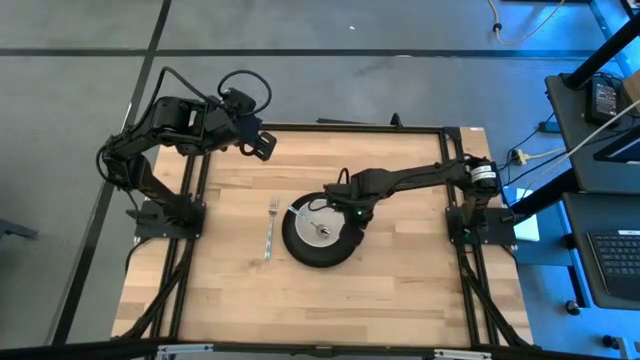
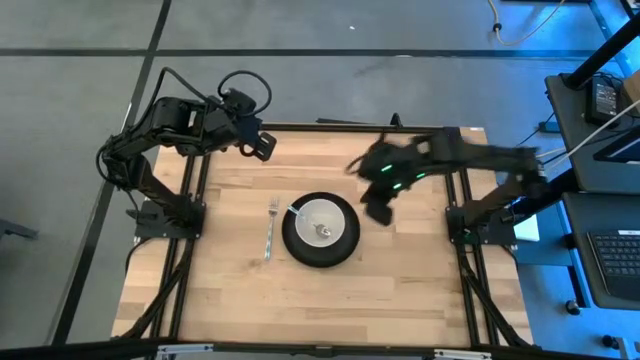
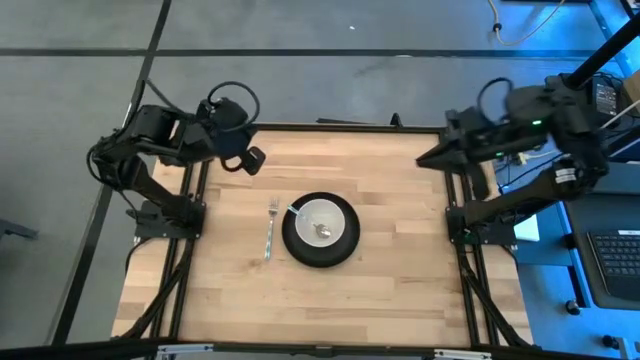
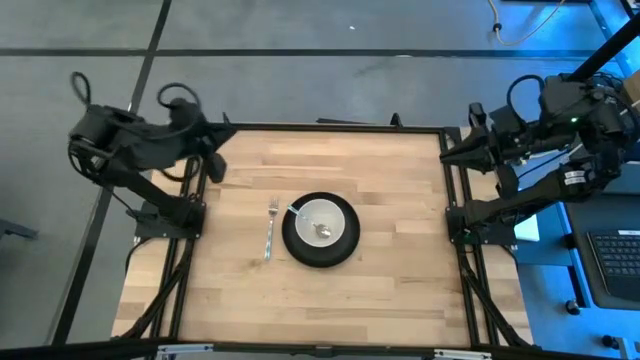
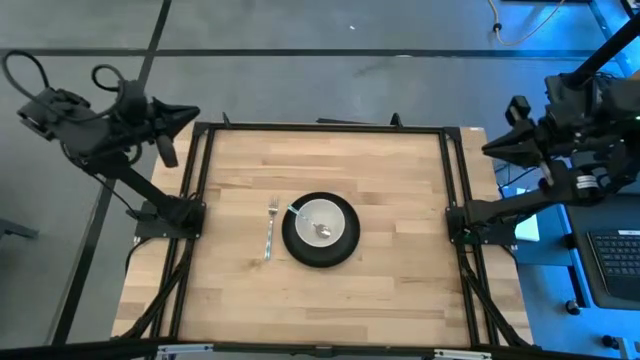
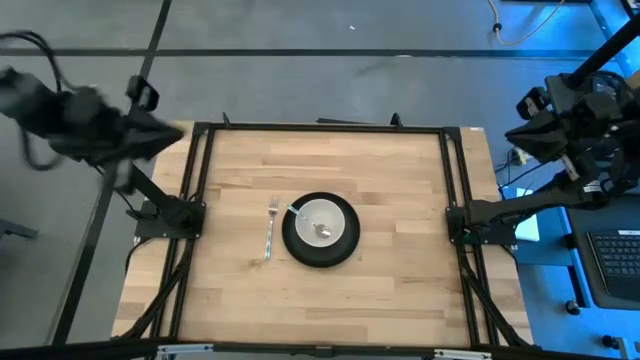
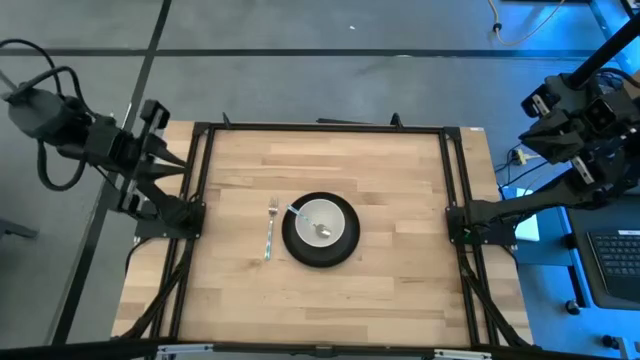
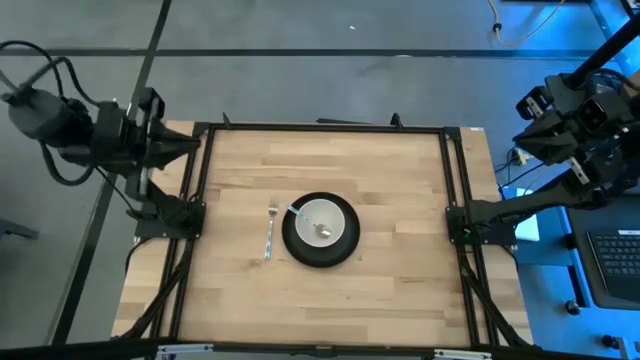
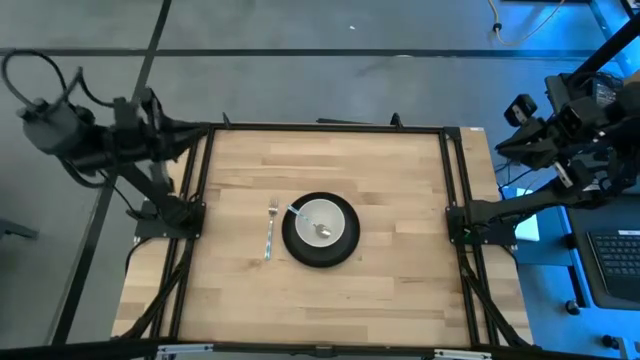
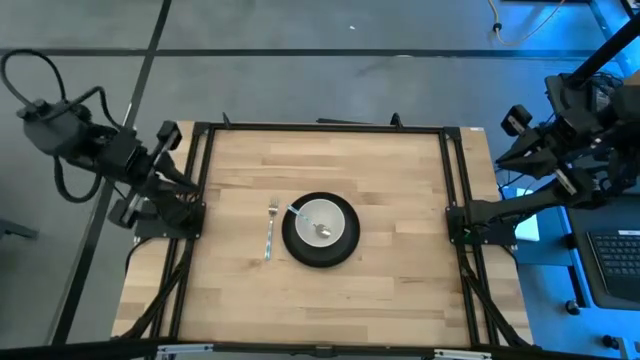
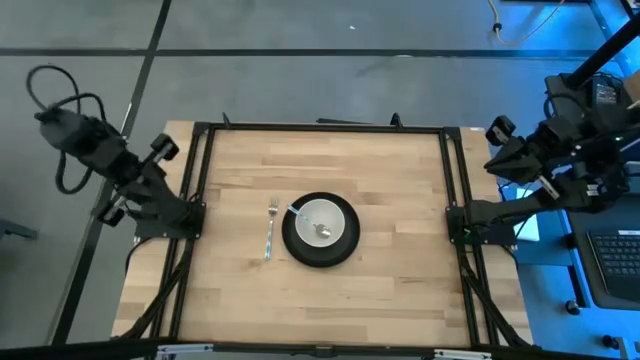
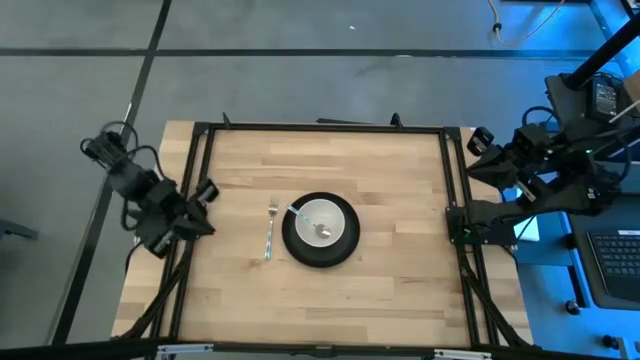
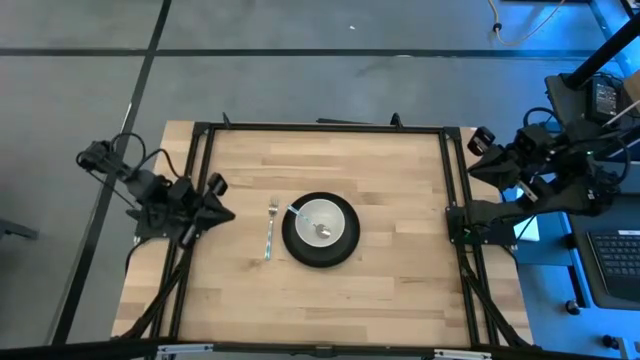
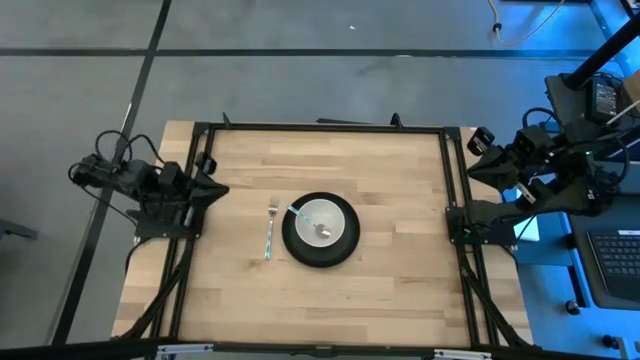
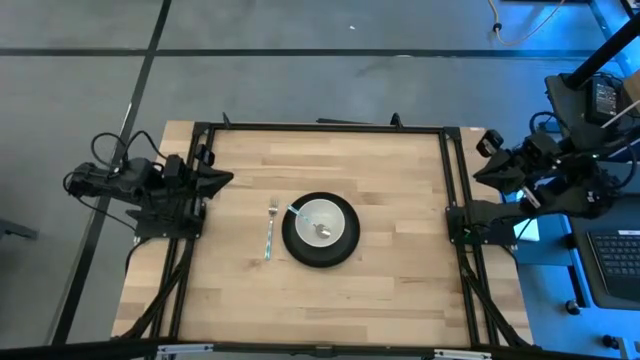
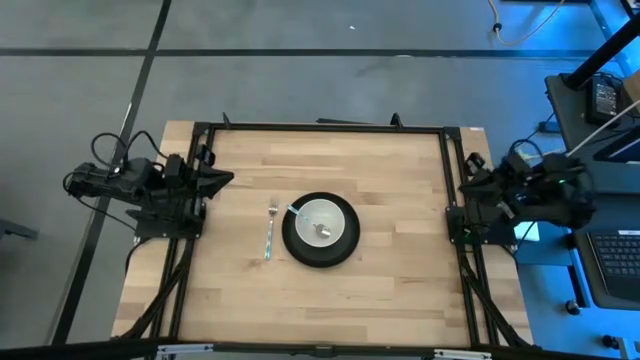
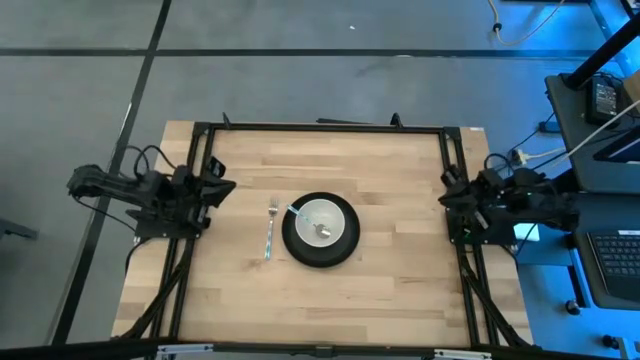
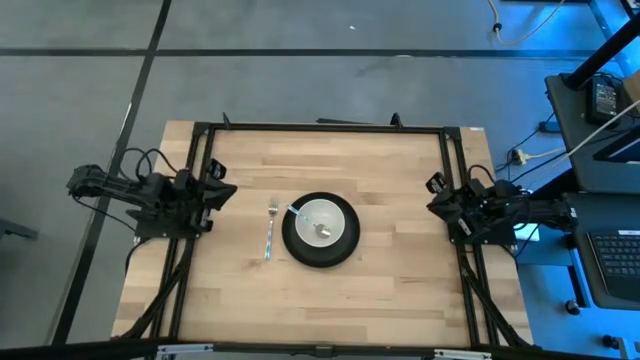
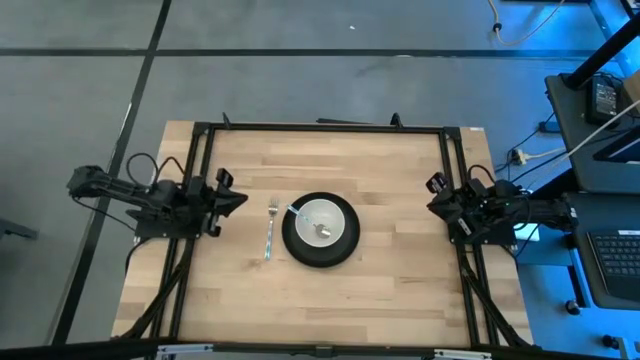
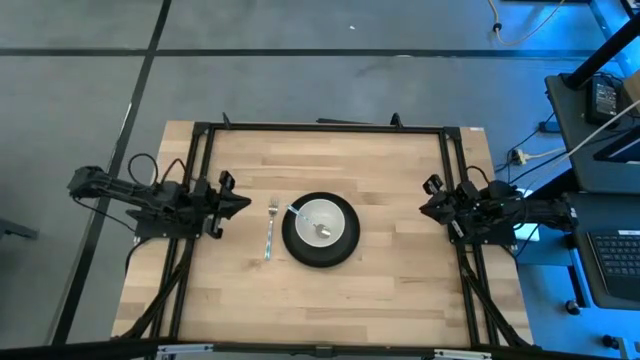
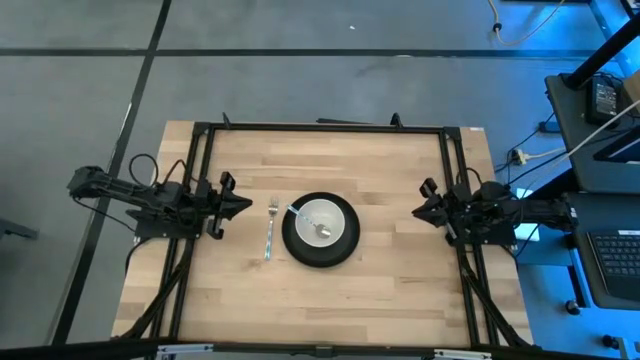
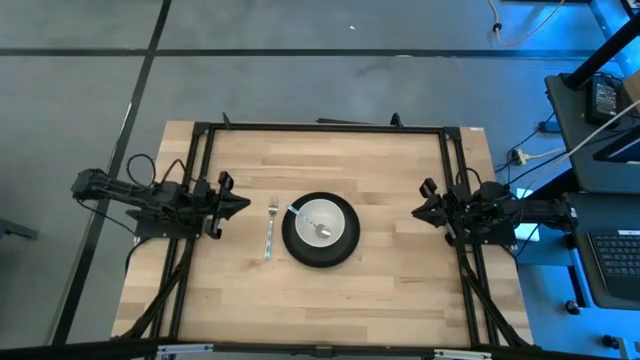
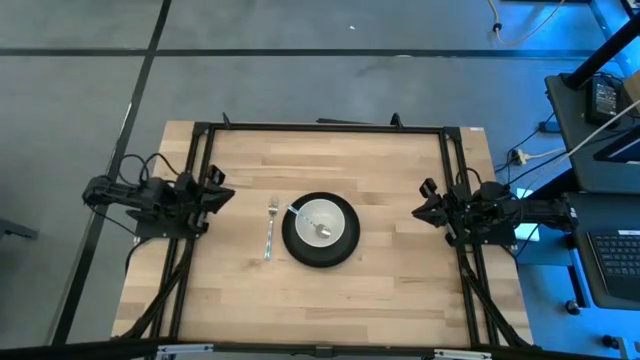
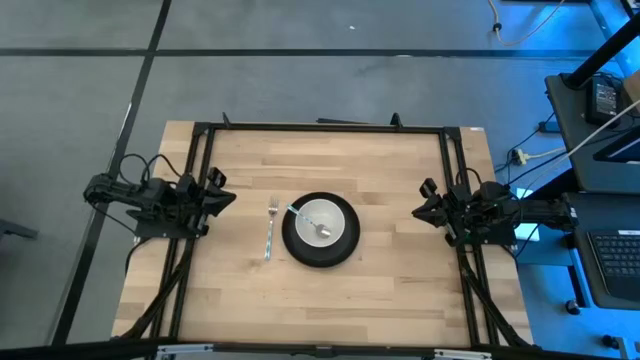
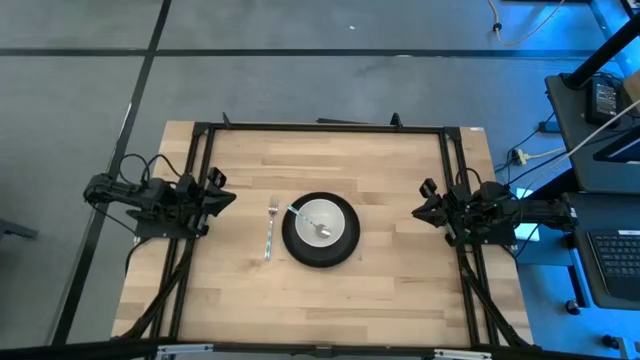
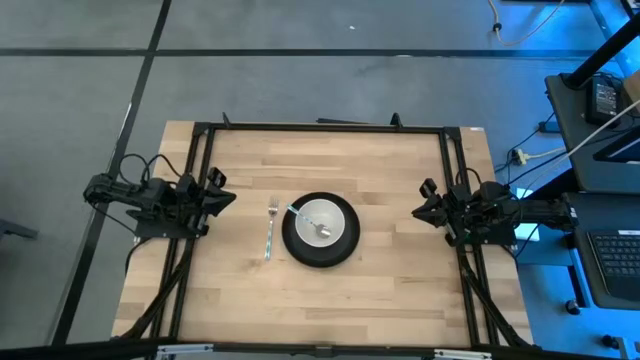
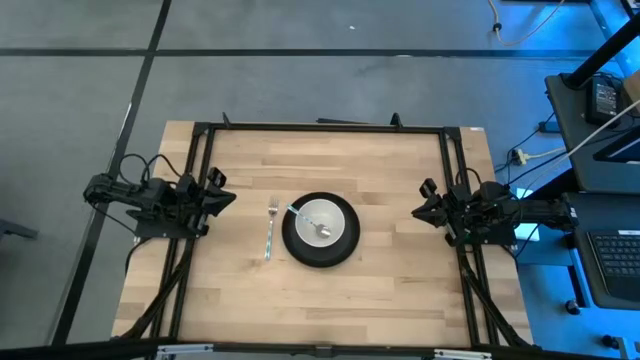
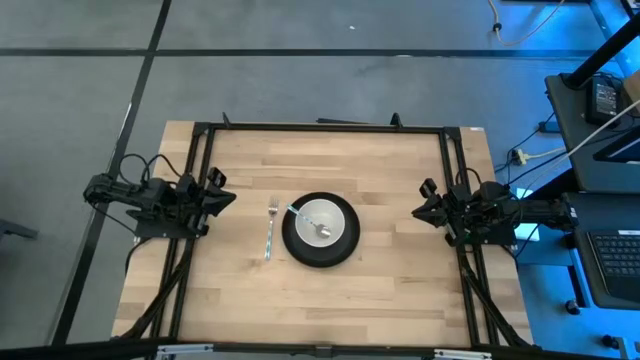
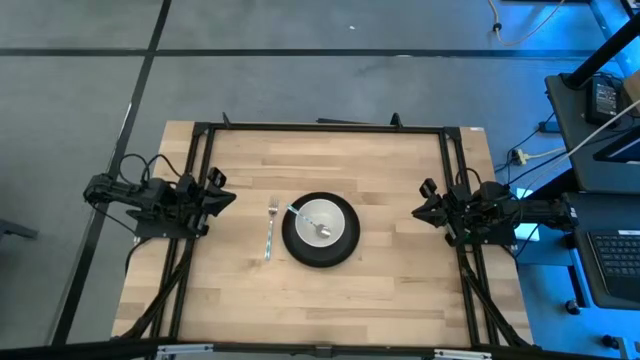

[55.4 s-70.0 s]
Task: Pick and place plate/cup/fork/spoon on tray
Return to Home Position

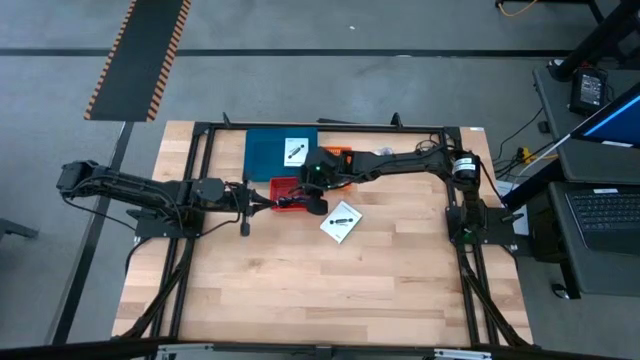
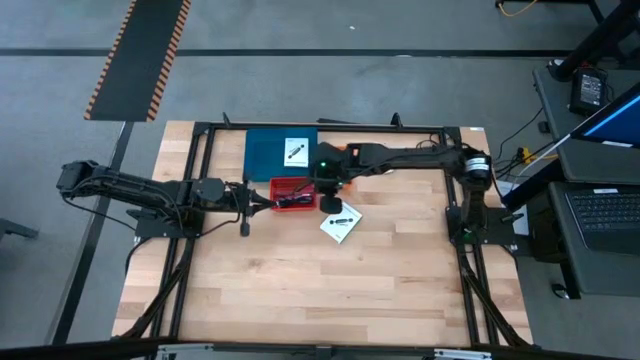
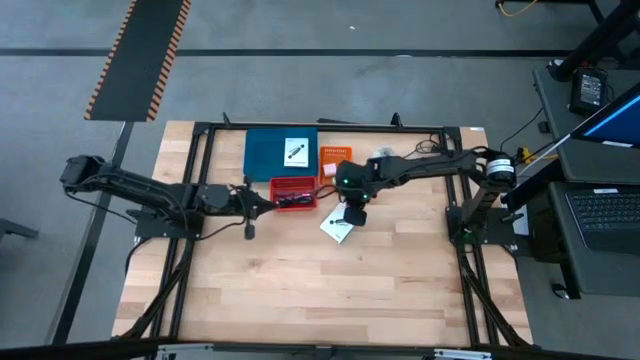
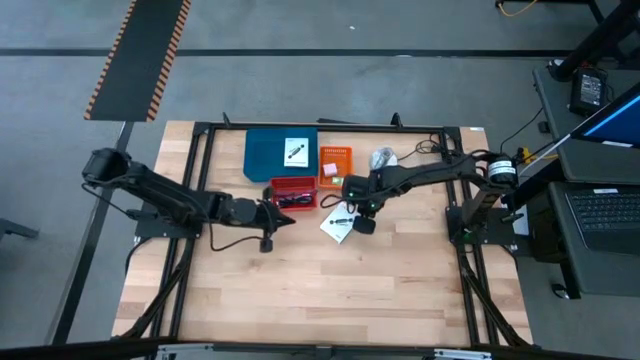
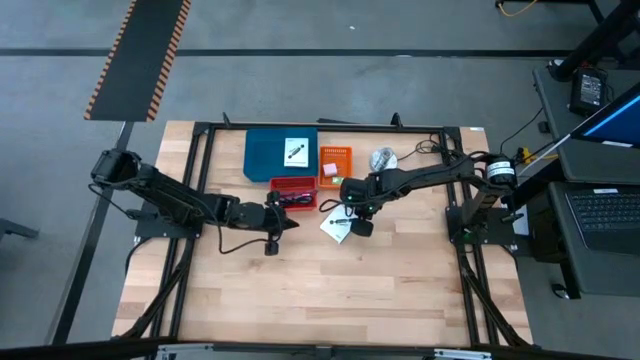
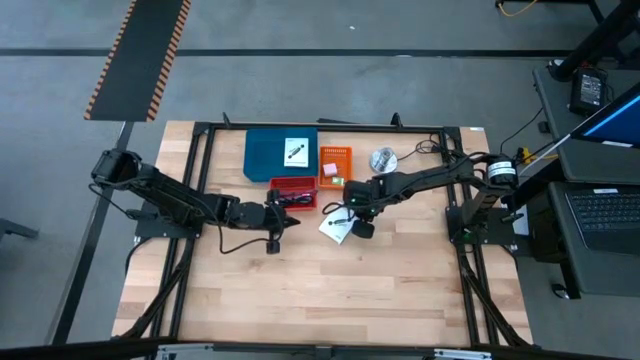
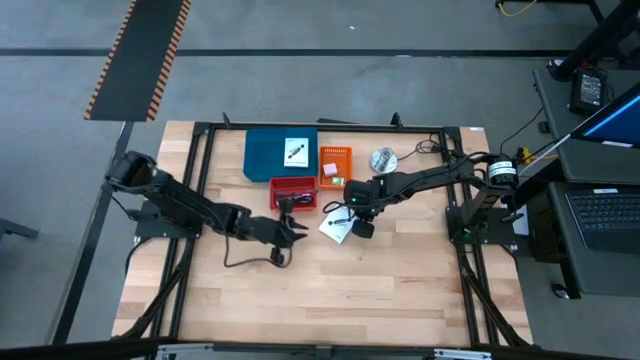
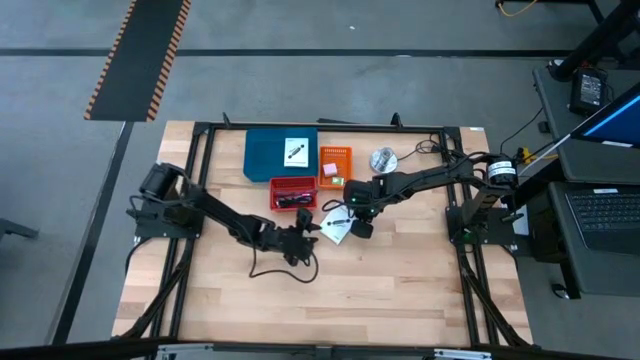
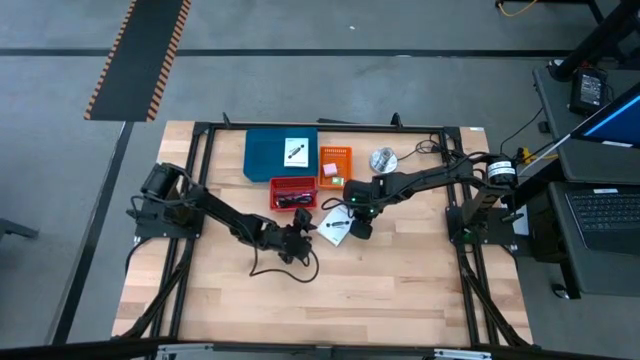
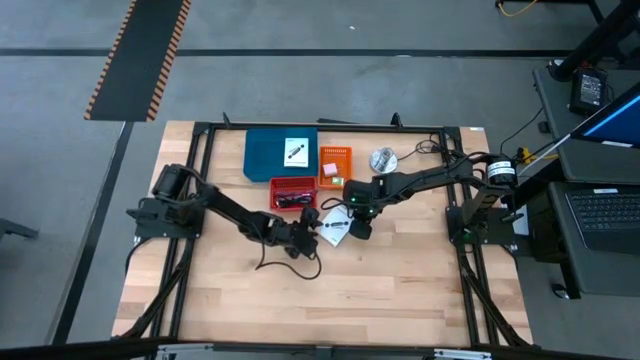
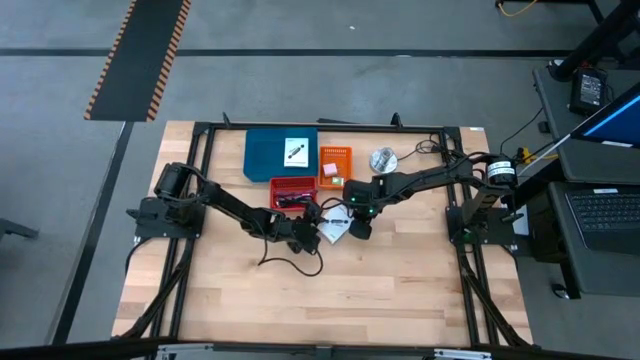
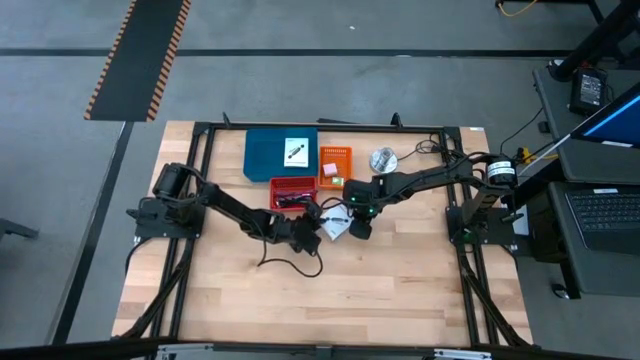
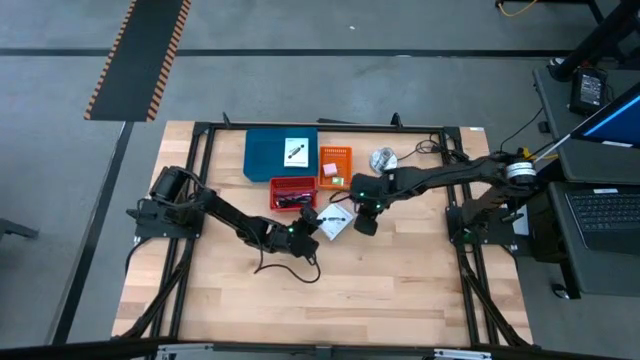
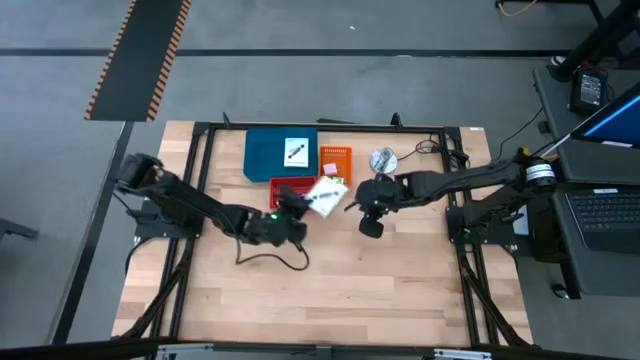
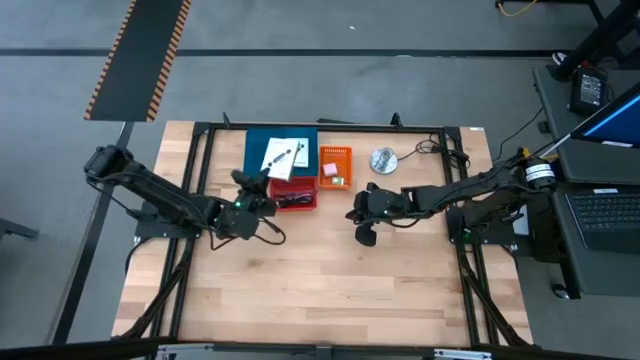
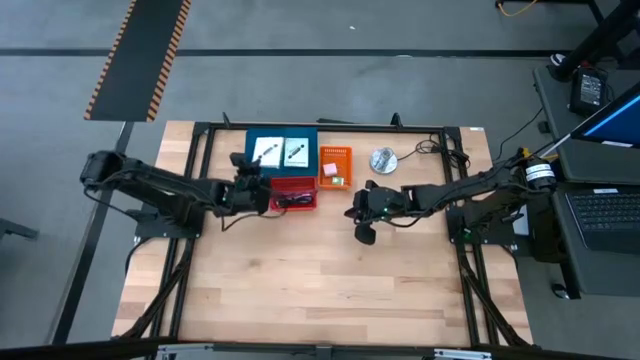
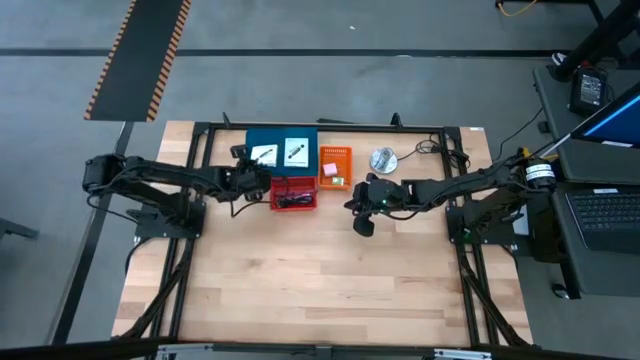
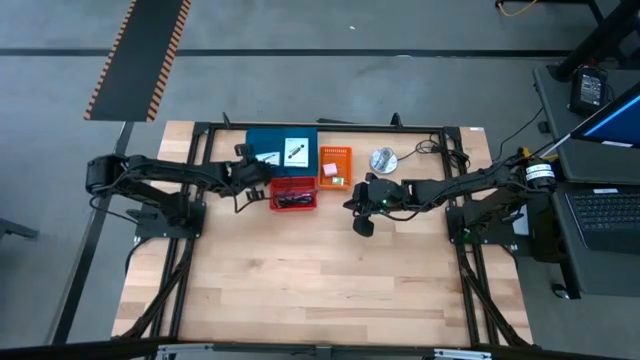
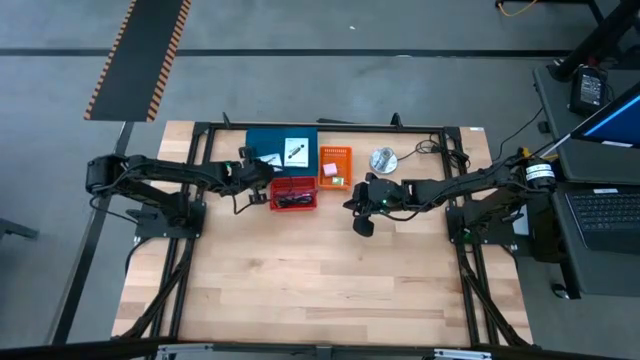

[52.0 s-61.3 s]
Task: Pick and place items into bin
Put the card reader box into the blue bin
